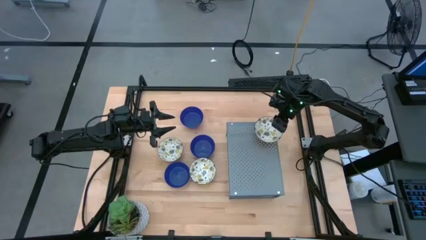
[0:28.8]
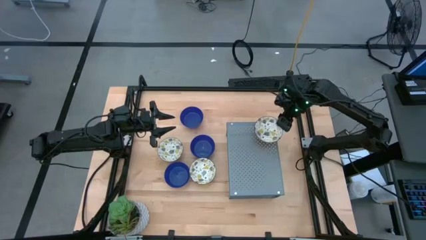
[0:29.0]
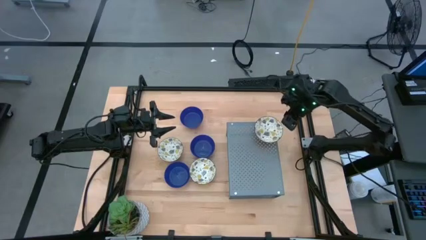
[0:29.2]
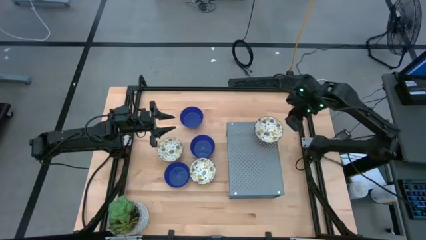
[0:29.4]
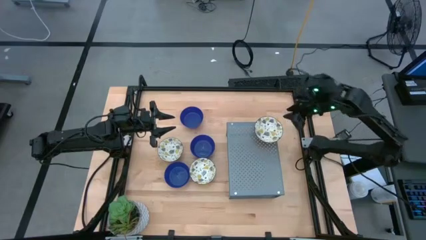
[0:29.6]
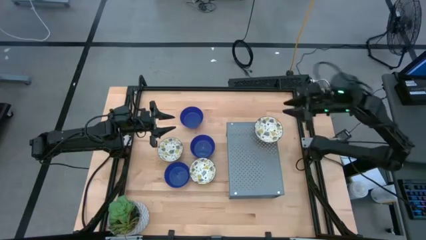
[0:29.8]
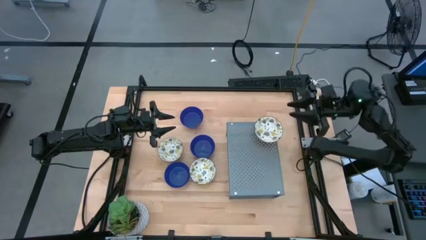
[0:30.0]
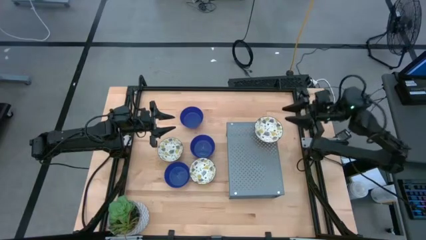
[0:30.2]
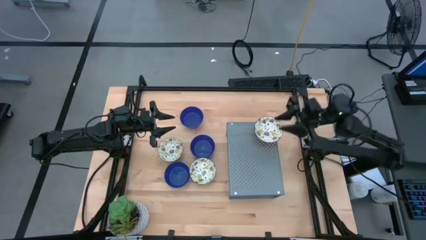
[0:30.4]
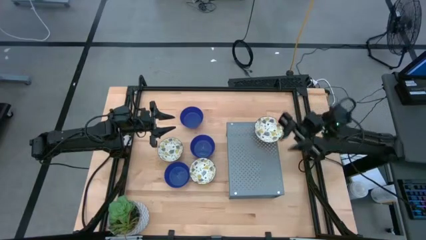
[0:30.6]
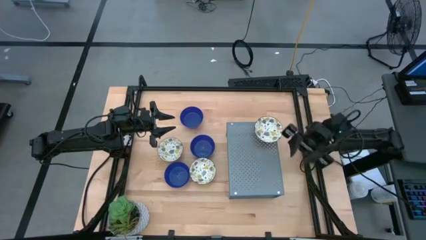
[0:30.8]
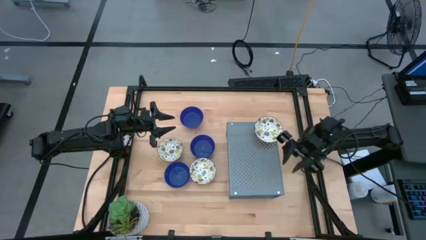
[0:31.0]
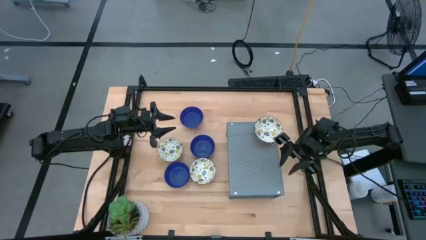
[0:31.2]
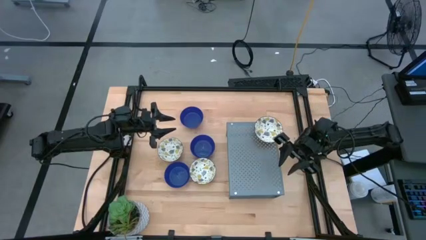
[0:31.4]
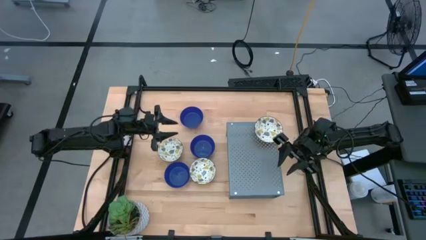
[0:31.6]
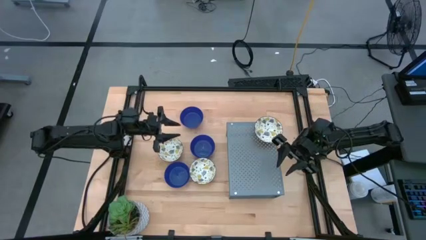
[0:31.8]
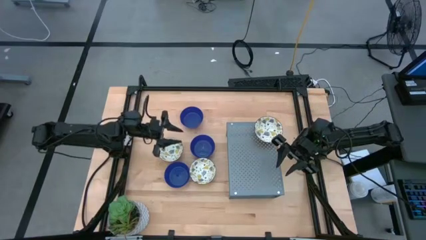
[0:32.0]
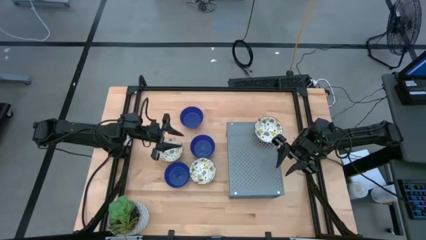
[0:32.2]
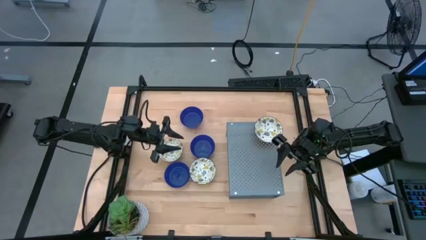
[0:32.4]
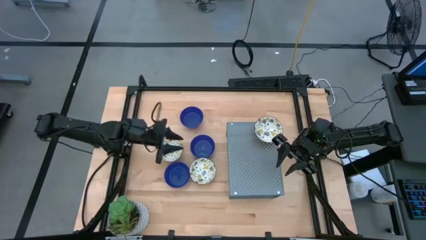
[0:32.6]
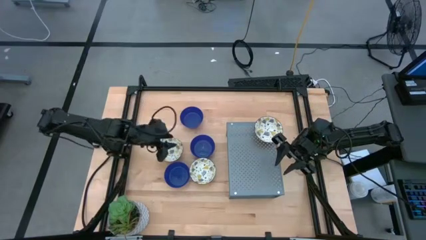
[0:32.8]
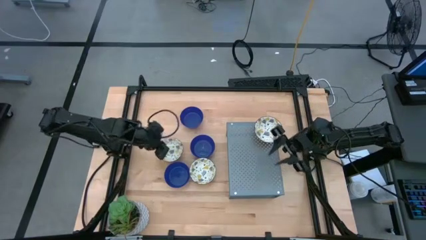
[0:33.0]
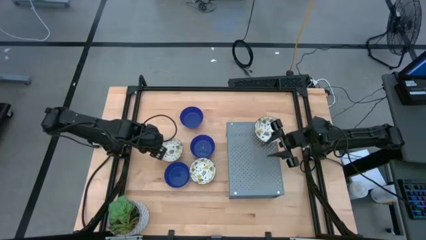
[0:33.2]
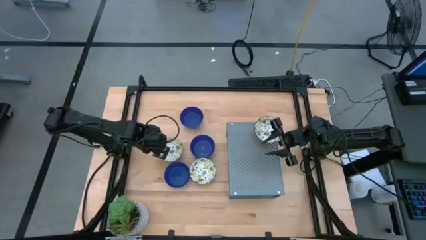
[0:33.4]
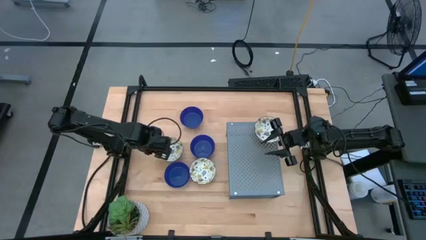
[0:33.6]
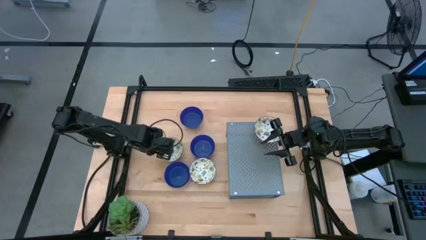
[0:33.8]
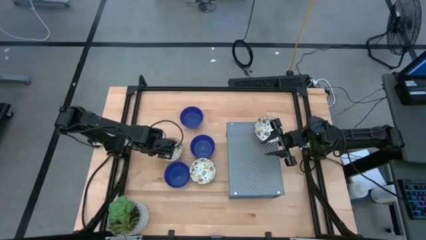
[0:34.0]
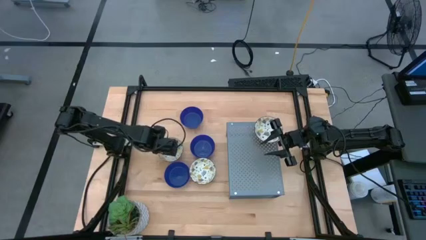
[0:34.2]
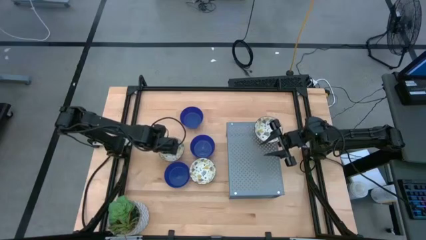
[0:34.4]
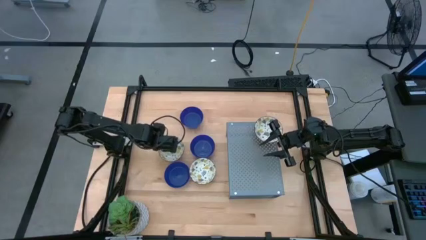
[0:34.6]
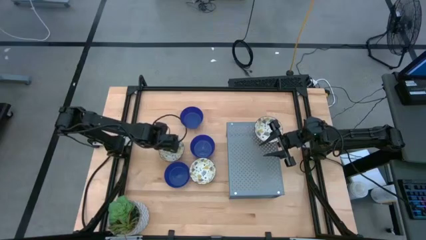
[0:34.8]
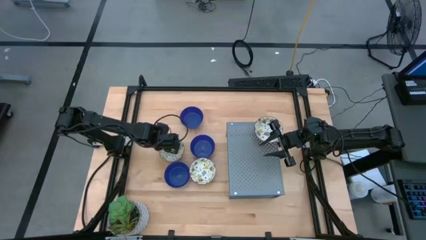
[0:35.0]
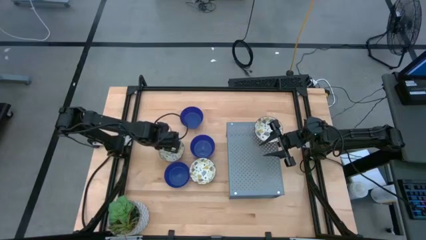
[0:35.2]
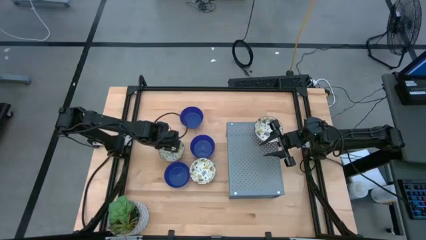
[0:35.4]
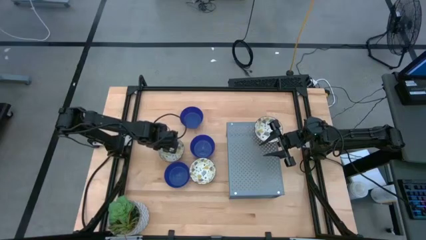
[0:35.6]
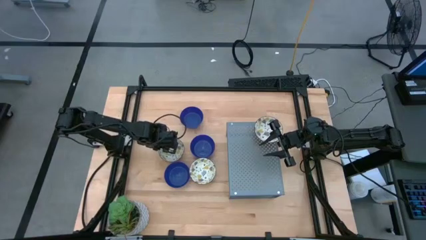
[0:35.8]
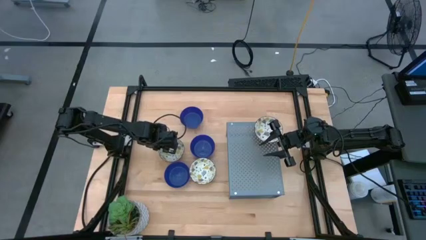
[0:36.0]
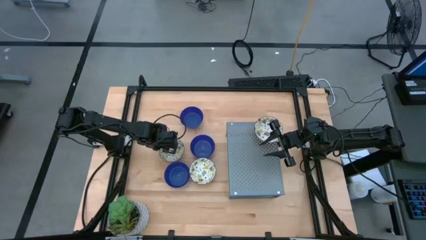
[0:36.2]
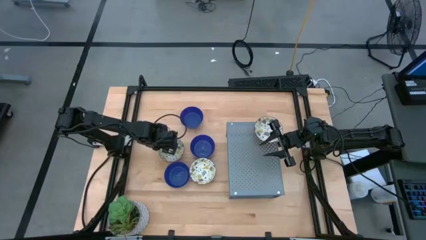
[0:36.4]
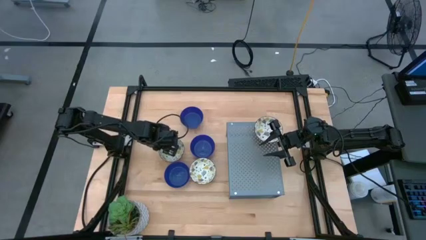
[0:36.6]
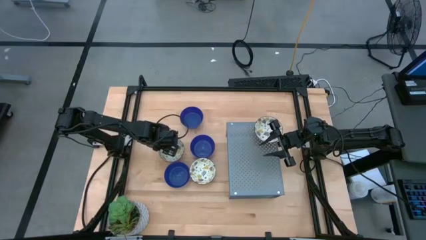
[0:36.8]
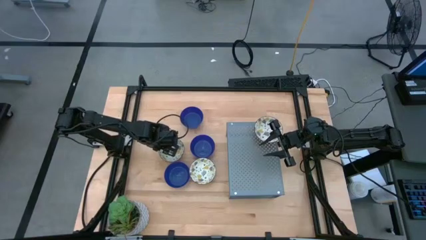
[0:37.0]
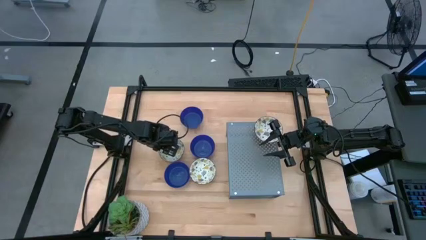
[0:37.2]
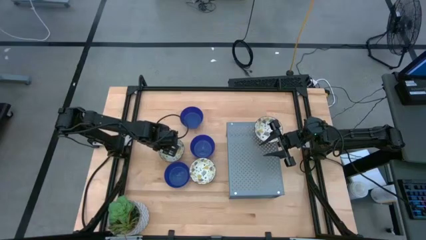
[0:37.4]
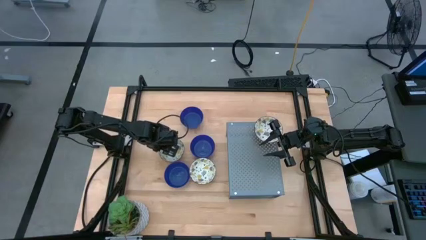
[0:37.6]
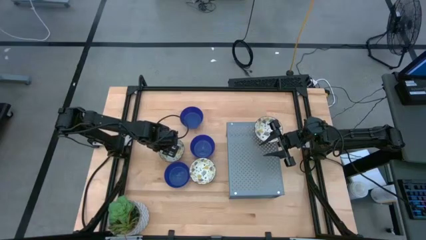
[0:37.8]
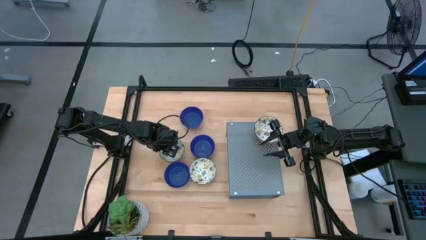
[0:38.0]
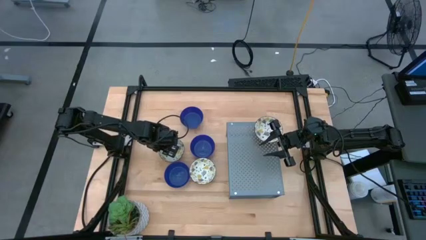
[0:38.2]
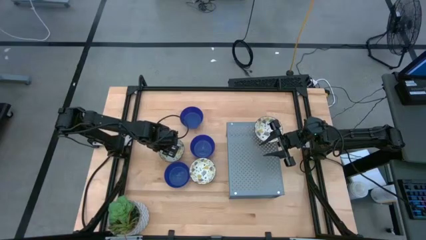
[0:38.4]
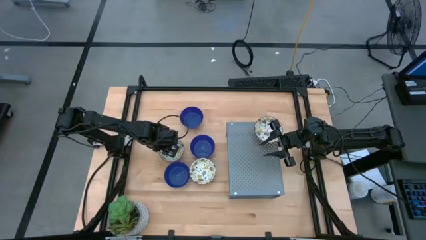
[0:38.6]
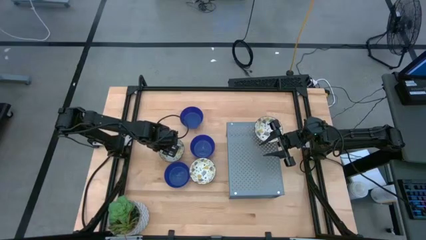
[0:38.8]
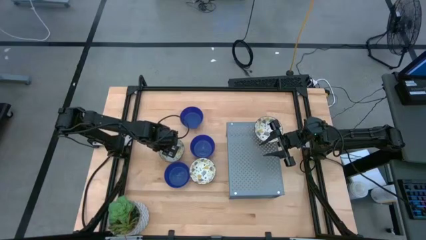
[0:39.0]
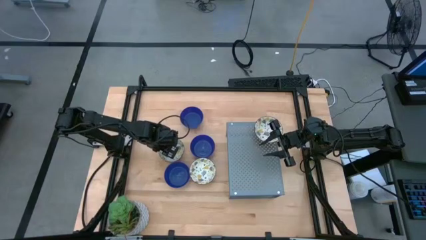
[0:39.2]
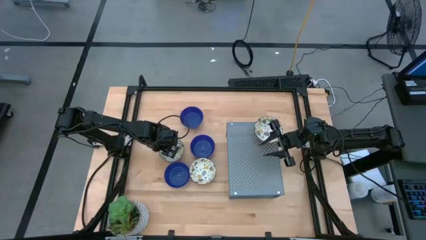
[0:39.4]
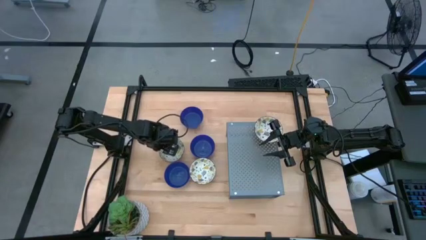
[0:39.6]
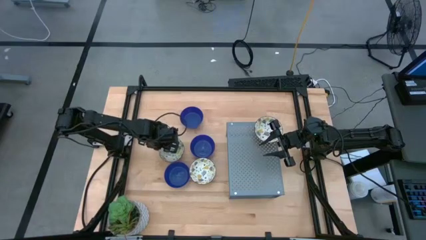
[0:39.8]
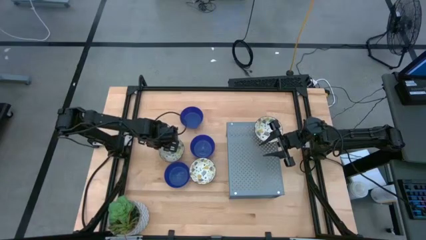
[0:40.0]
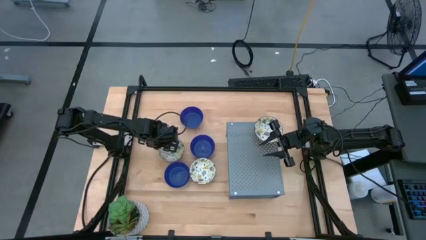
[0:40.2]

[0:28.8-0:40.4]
Task: Pick & Place Mini bowls
Stack the left yellow bowl on the yellow bowl on the shelf

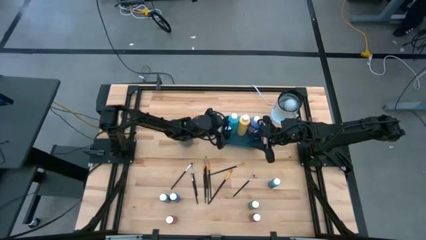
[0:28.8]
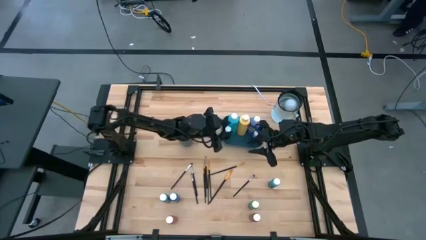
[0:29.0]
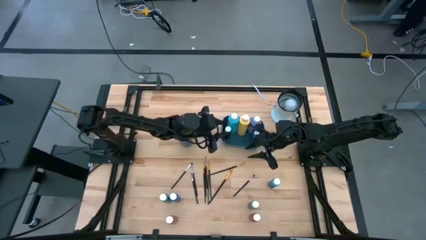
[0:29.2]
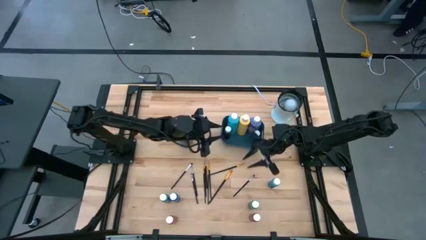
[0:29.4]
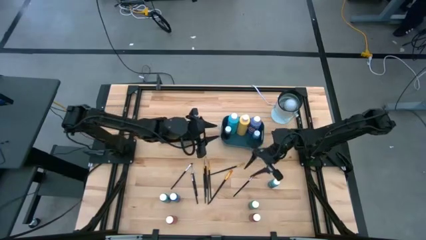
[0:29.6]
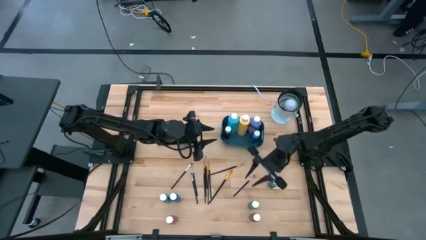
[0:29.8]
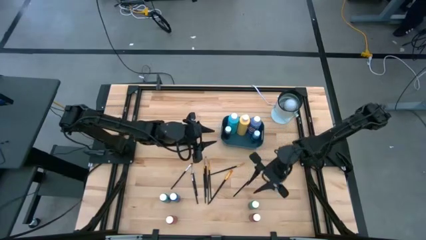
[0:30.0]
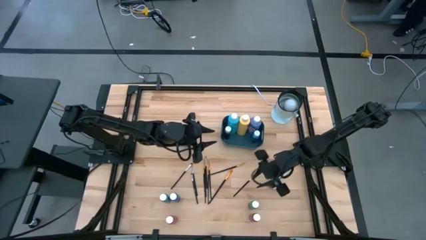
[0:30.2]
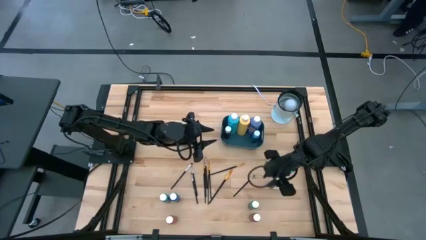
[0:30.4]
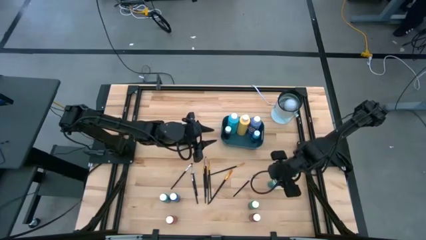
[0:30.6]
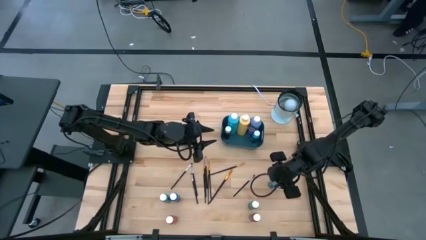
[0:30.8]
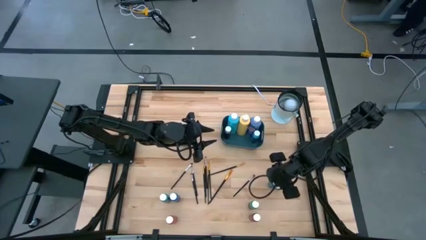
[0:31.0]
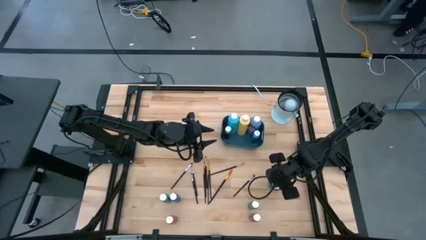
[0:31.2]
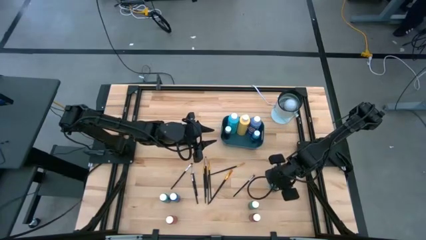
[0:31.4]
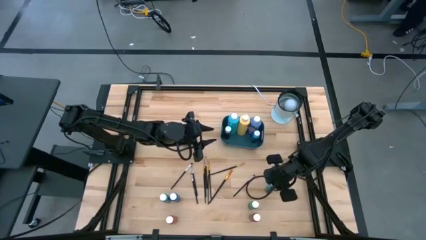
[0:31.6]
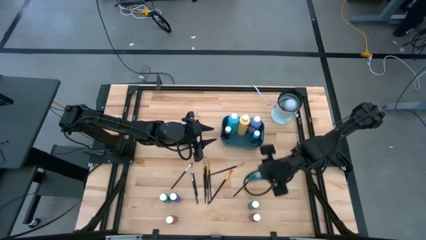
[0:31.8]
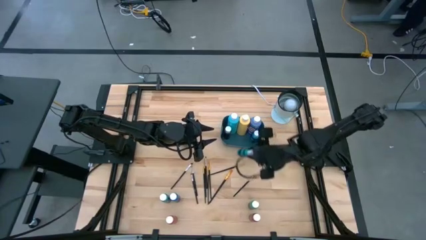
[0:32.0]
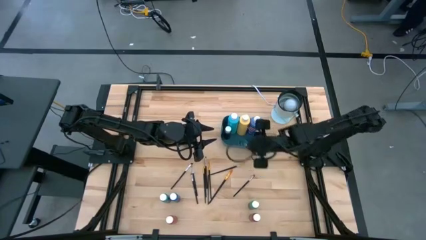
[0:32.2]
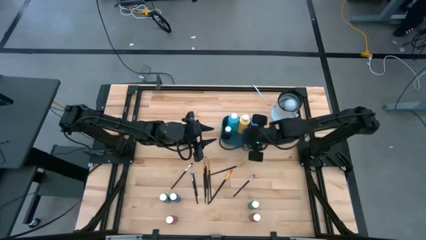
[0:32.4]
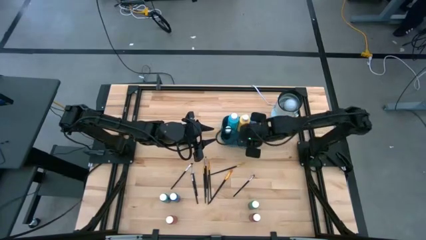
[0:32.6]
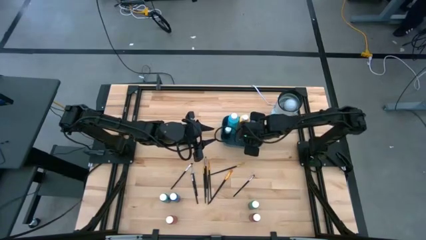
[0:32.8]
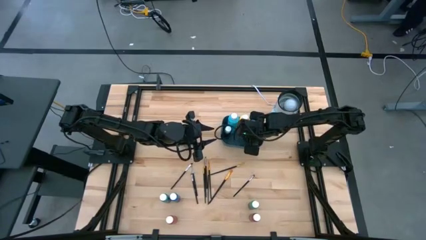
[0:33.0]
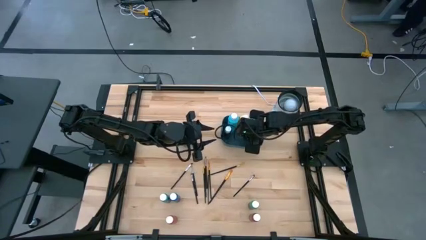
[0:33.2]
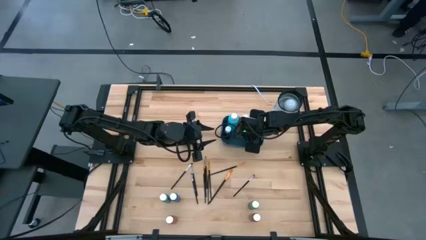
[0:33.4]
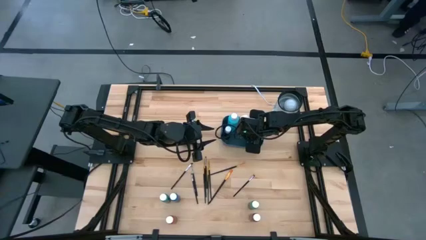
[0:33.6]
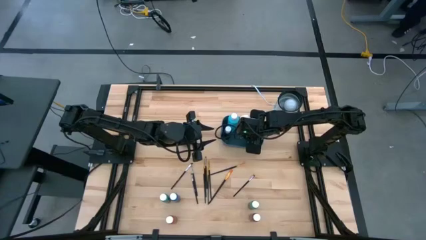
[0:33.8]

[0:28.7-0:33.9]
Task: Pick & Place Paint Supplies
Put the small light blue paint bottle into the blue bin
